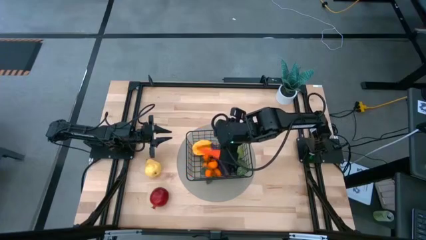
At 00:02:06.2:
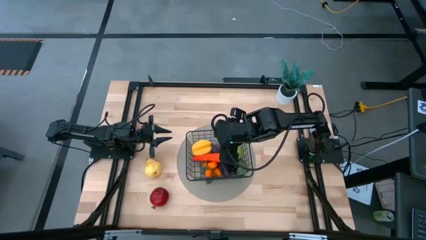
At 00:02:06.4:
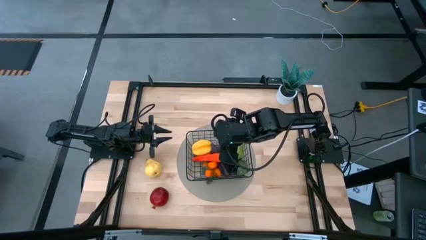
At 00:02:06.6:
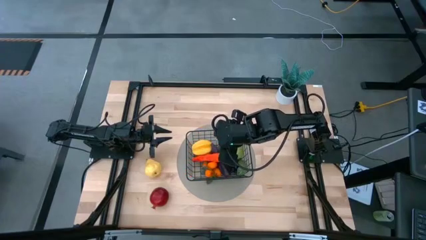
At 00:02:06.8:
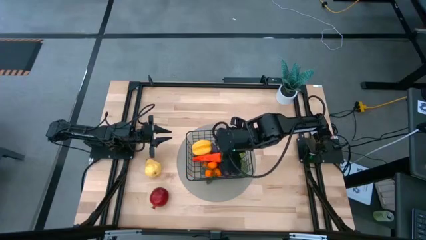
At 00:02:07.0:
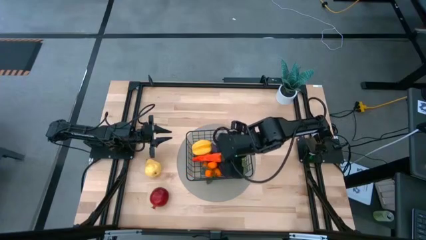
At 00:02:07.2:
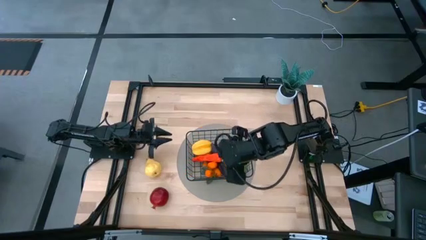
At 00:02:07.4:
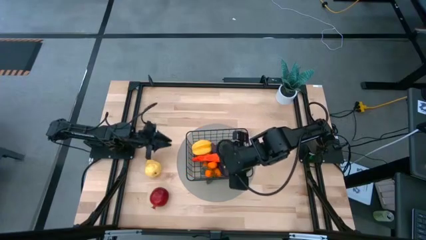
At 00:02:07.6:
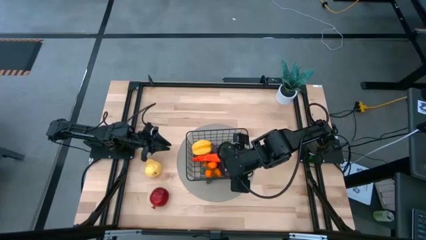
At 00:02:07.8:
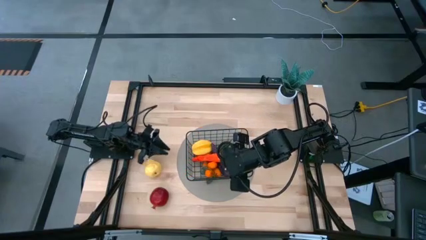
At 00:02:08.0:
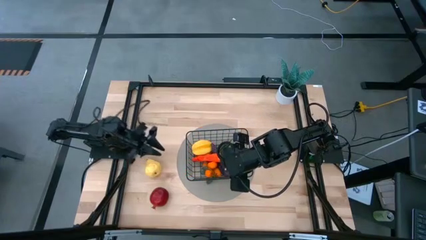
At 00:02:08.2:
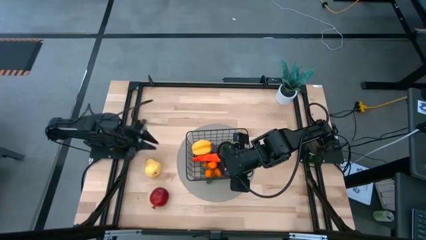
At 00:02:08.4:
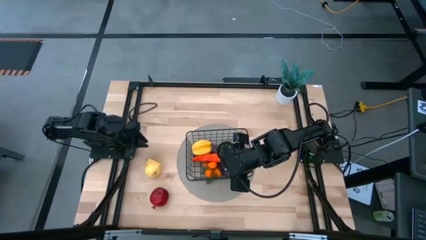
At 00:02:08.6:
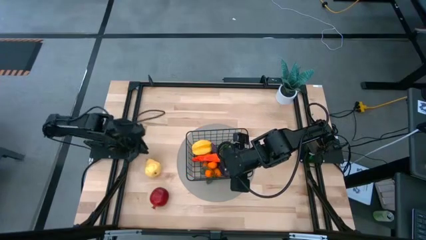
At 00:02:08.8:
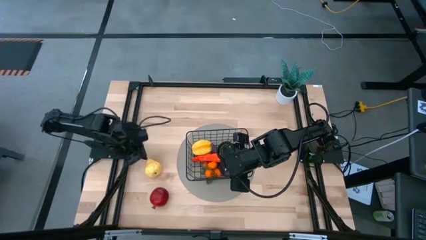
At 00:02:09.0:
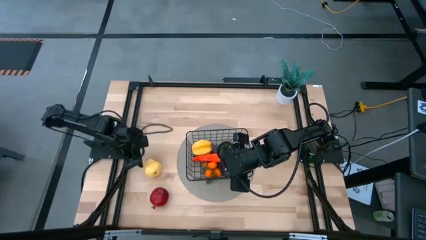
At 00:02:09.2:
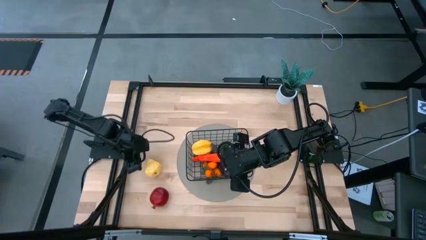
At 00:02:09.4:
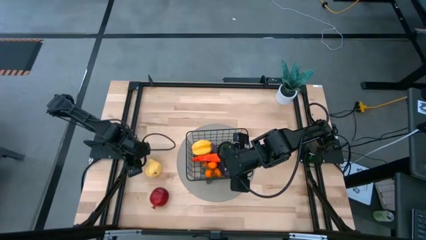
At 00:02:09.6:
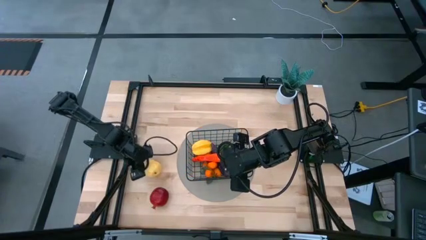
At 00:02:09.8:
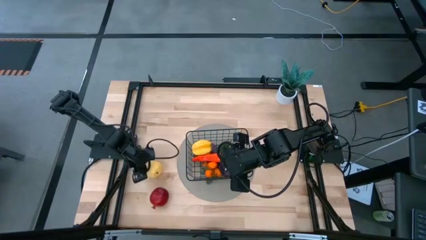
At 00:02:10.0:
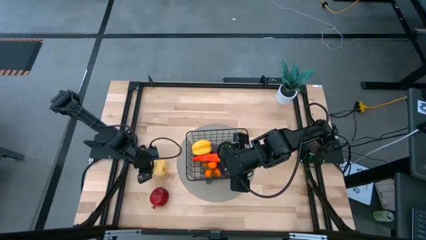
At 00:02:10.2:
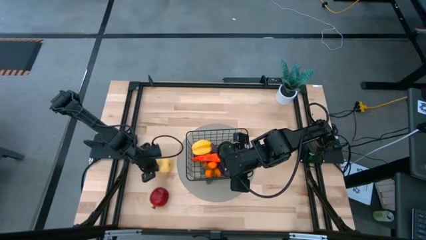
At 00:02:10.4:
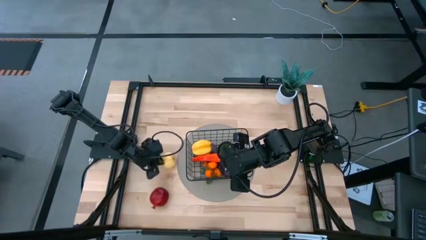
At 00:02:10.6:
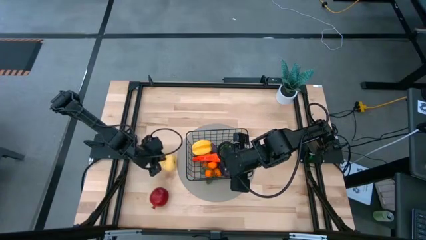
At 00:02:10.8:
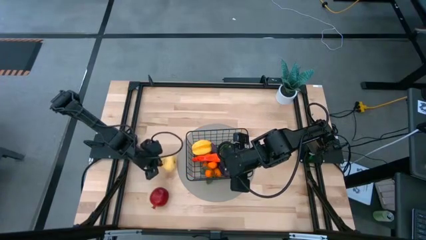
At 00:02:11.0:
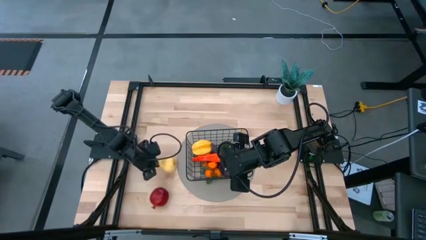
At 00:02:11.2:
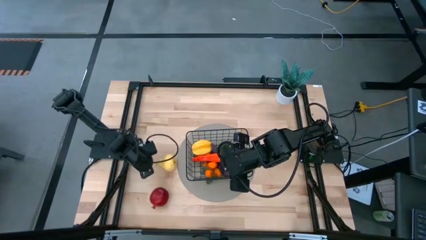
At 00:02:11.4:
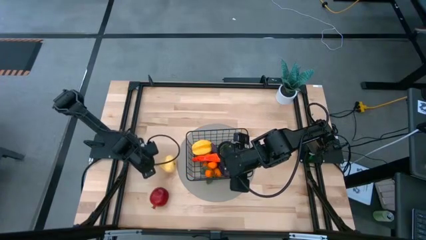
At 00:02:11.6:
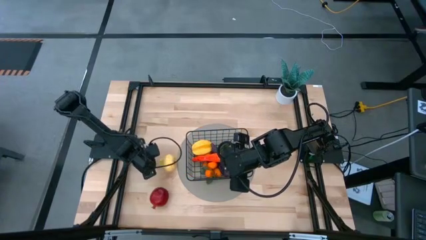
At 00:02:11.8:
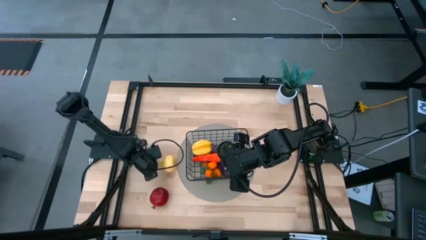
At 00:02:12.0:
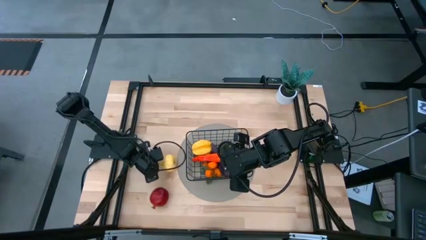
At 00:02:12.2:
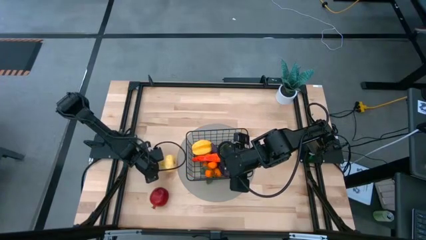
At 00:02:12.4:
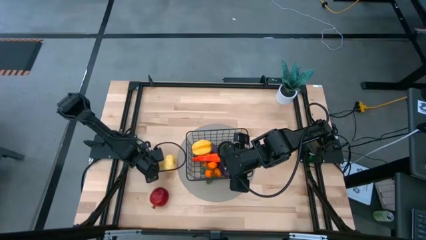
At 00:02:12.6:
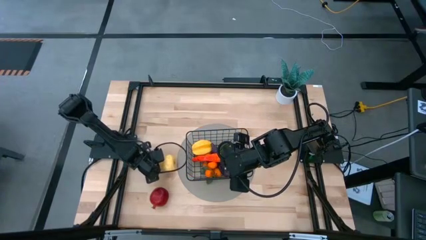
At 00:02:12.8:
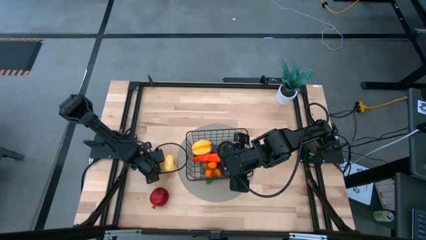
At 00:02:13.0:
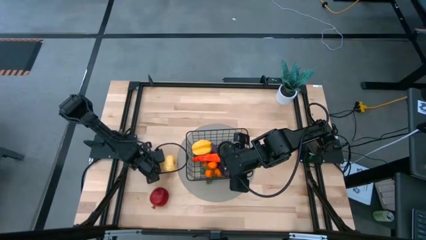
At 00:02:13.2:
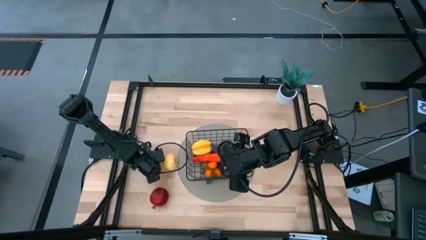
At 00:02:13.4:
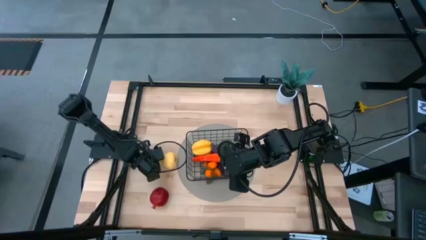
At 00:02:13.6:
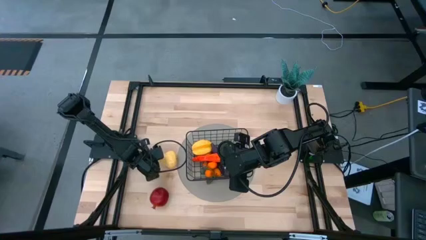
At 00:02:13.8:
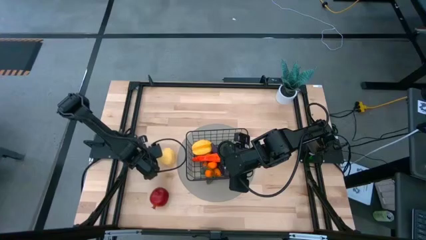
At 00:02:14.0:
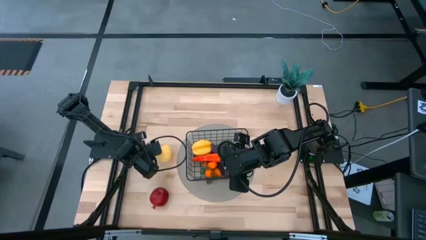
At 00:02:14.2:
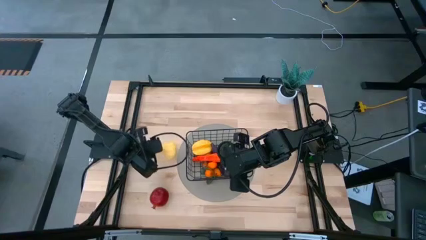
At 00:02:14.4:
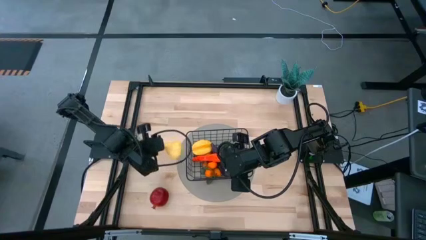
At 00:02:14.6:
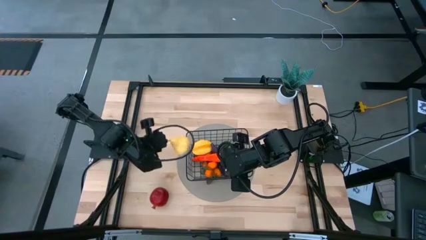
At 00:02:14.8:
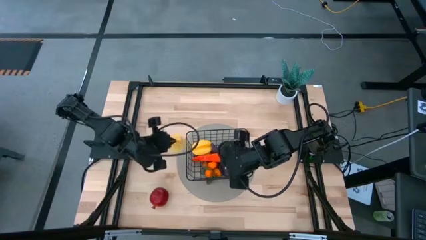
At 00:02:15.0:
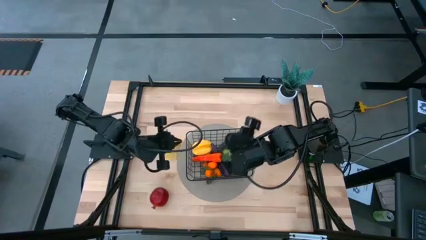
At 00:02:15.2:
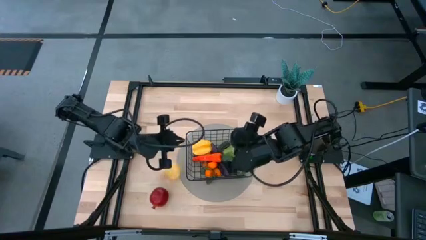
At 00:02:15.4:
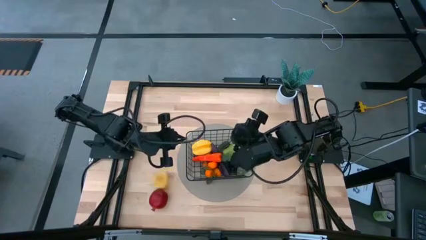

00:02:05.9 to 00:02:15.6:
Task: Build produce basket
Put the yellow pear in the mesh basket

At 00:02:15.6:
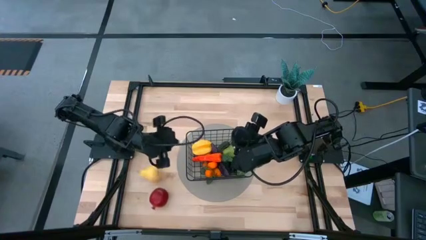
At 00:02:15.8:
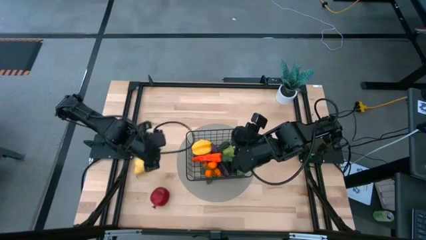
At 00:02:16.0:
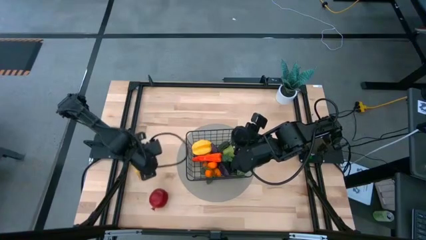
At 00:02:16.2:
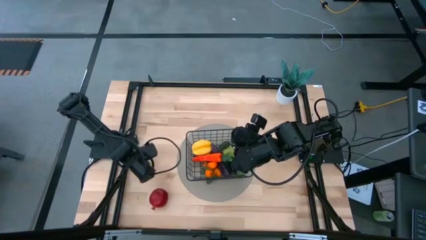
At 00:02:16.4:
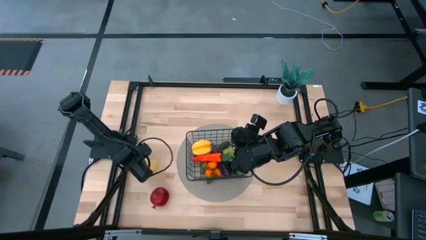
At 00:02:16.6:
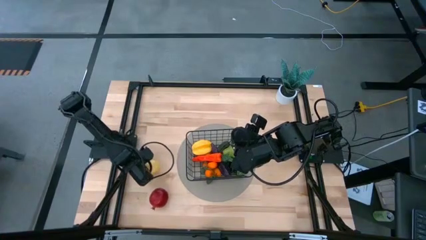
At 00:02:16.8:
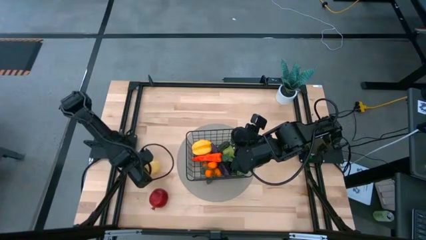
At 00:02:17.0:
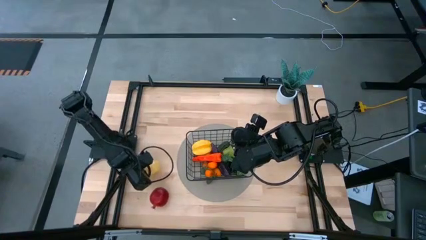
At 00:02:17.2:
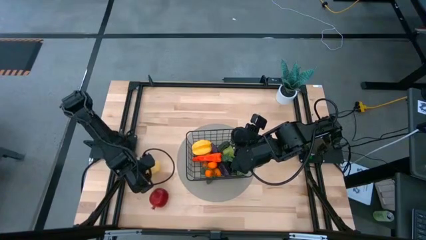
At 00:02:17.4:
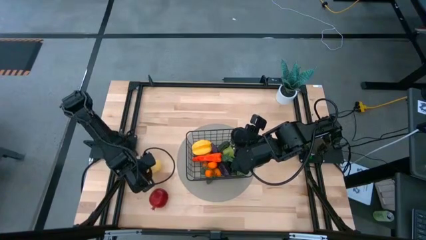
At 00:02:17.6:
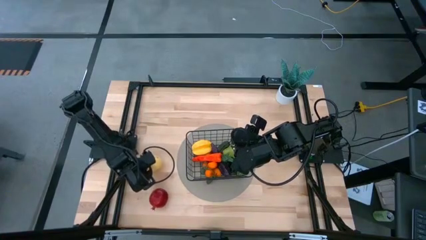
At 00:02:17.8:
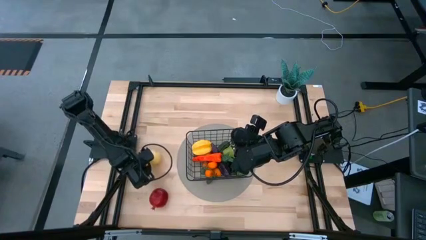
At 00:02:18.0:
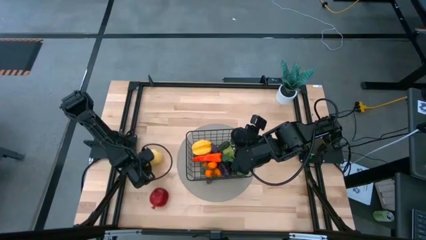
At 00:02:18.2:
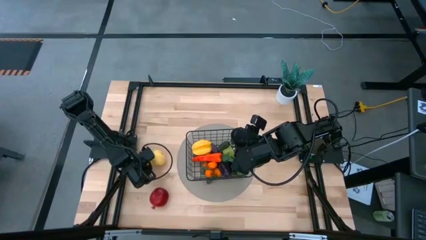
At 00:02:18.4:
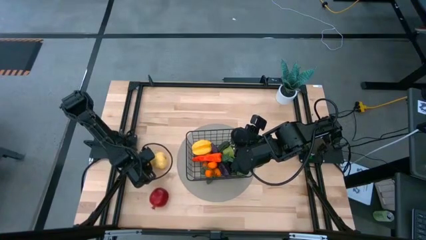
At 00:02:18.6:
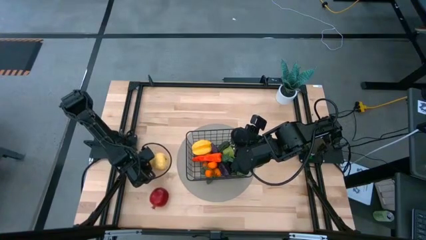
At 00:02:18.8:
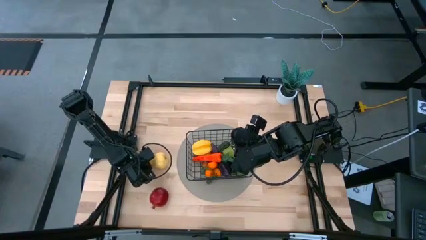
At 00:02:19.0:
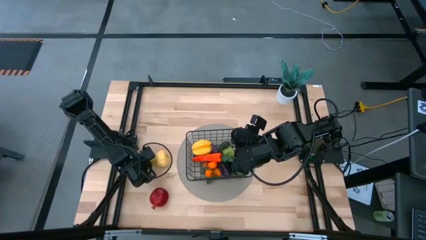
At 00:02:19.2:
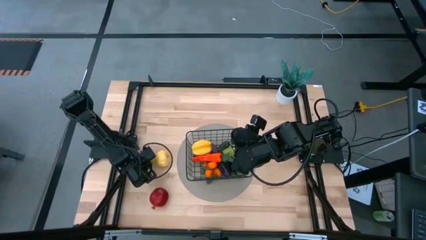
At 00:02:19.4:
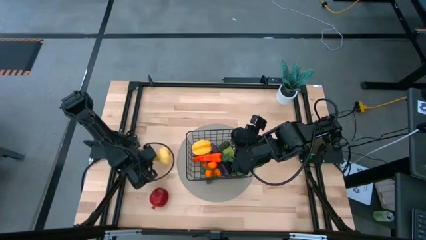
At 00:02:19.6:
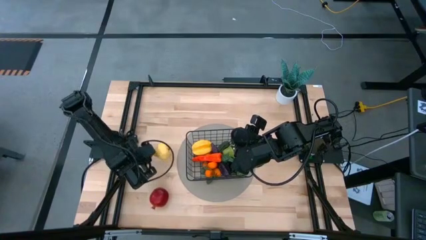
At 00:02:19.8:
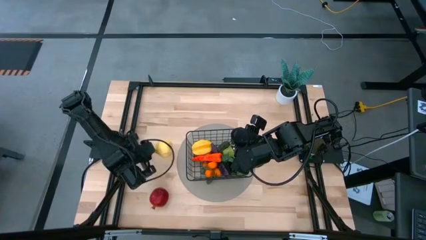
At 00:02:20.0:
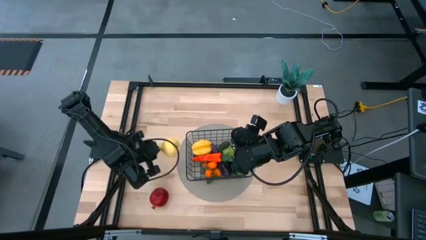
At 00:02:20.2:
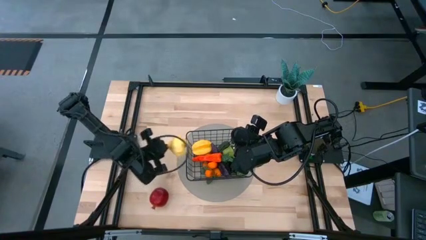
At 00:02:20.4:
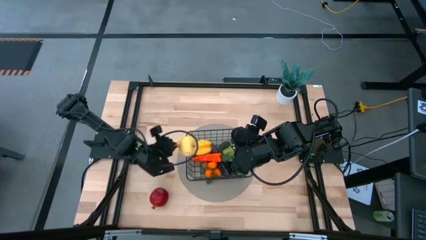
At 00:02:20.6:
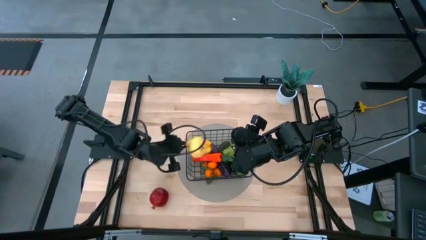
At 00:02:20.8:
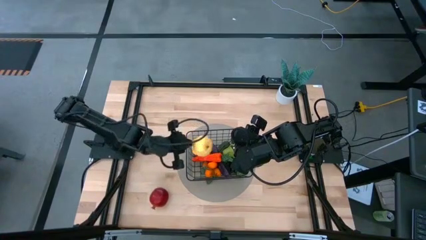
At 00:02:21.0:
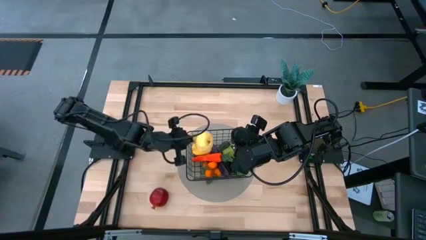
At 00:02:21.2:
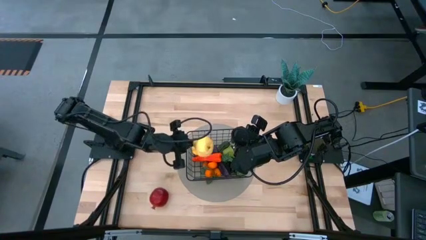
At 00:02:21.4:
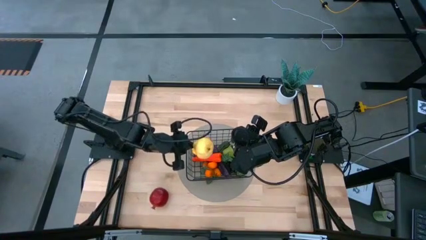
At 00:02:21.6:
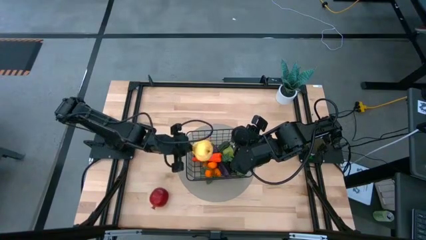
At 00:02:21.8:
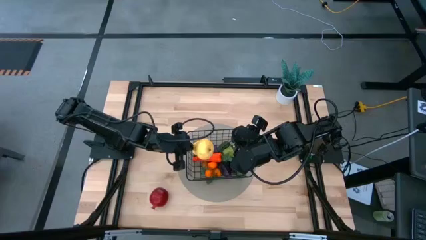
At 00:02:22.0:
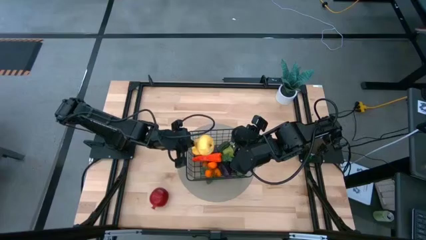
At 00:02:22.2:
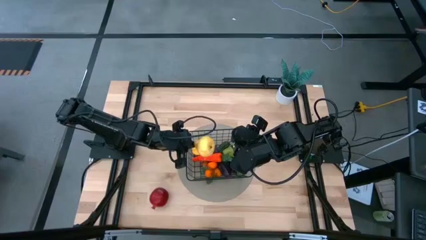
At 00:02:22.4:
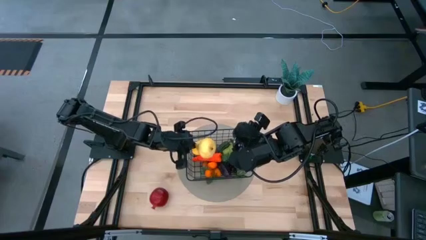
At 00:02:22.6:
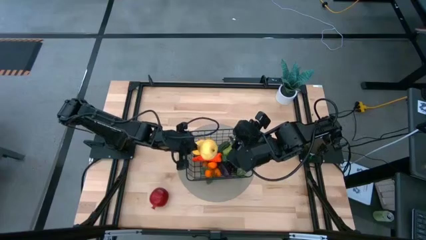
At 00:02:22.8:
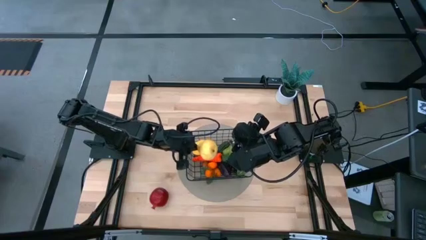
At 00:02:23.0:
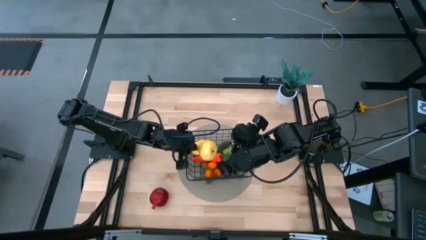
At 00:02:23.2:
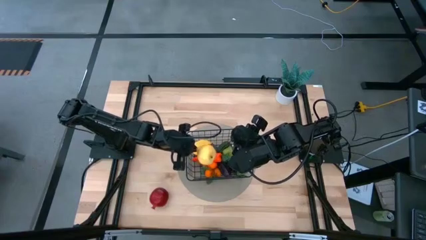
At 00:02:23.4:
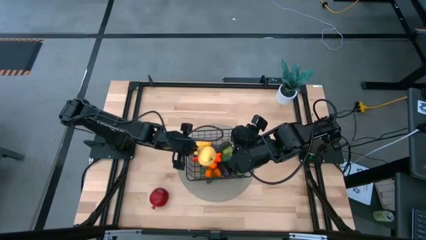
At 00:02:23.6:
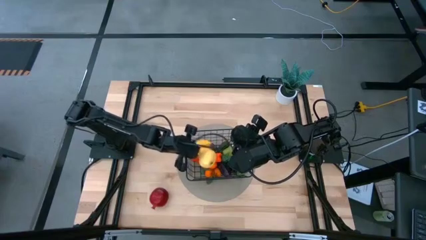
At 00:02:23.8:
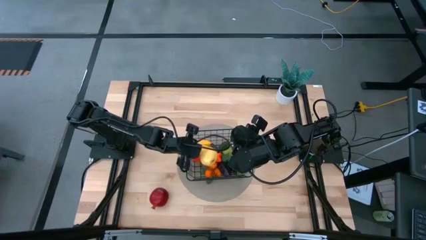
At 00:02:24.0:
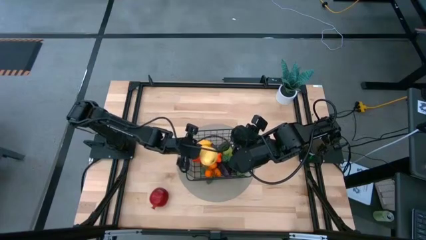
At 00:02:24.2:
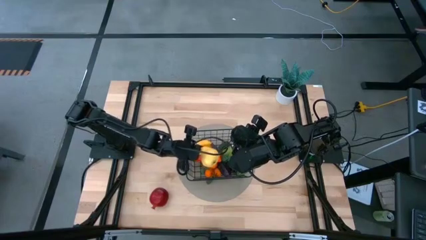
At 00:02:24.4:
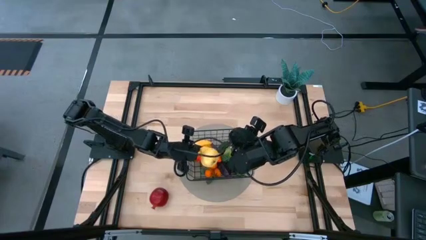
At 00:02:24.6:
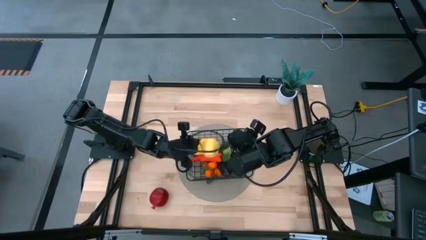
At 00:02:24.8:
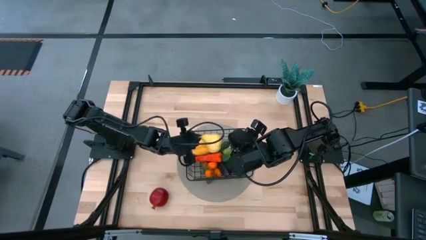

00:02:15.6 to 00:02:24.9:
Put the yellow pear in the mesh basket
